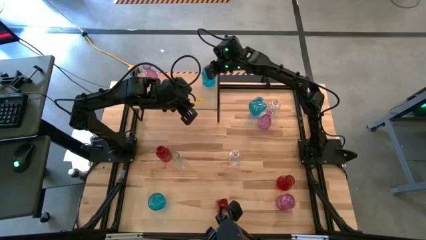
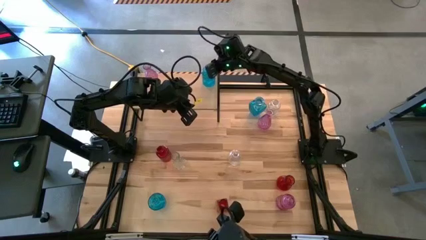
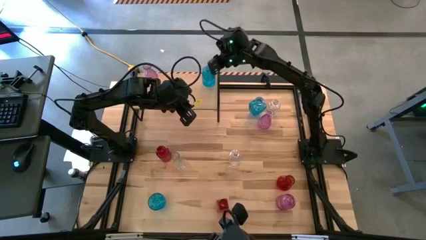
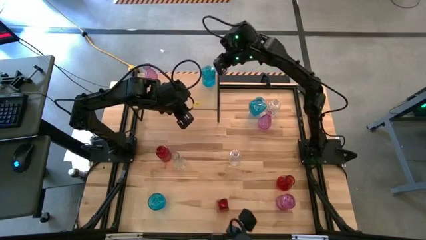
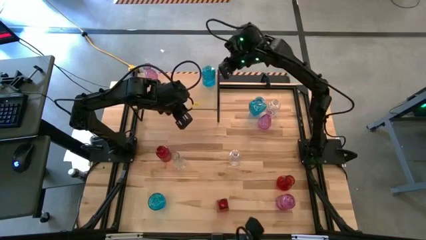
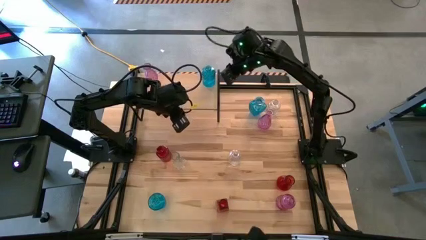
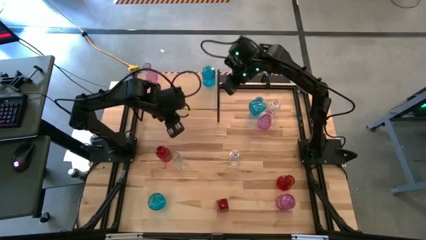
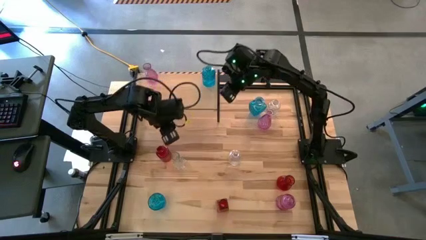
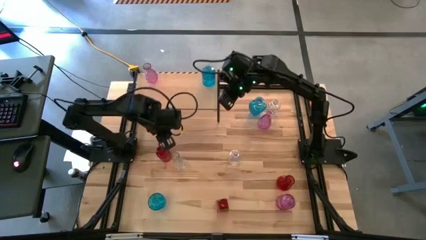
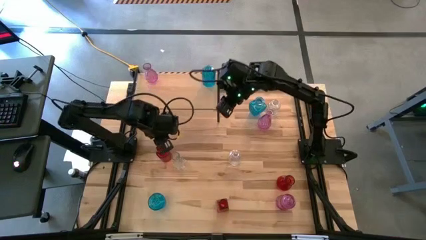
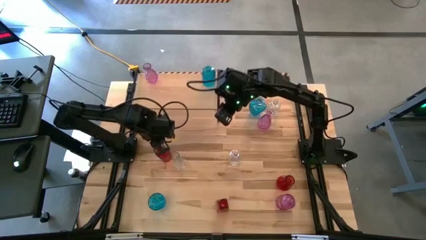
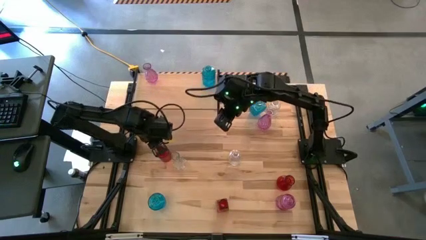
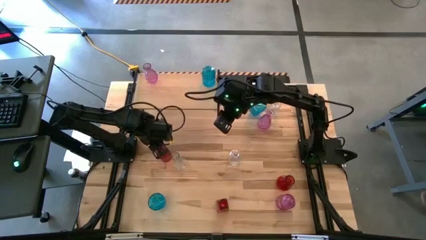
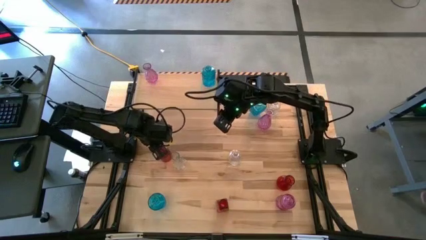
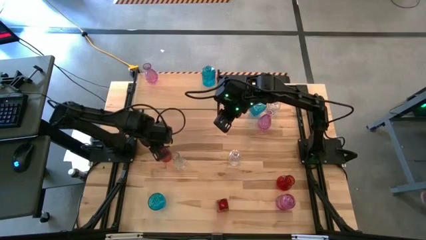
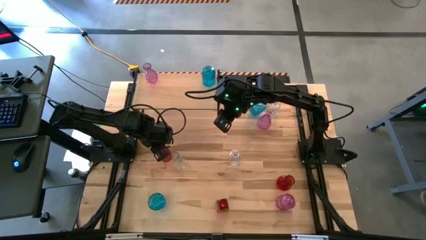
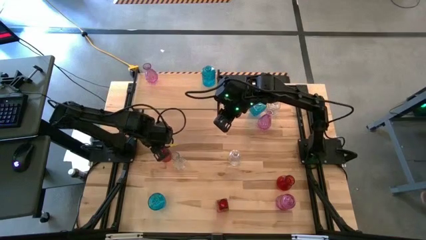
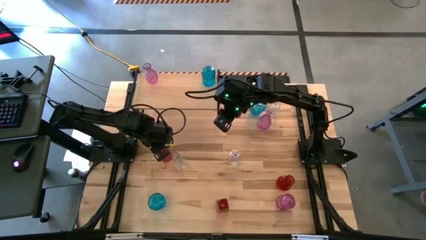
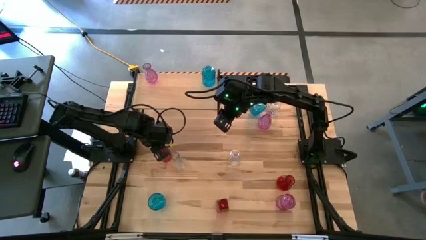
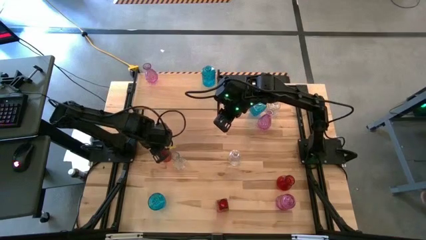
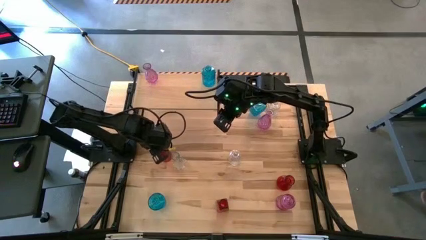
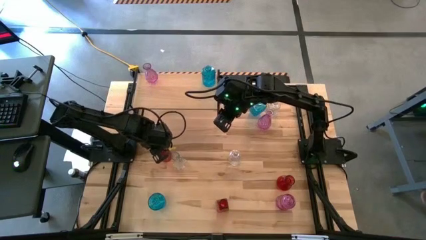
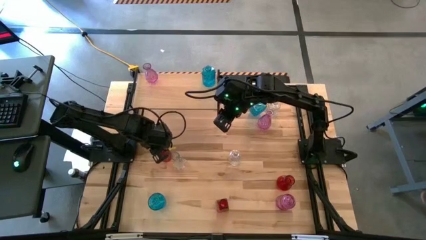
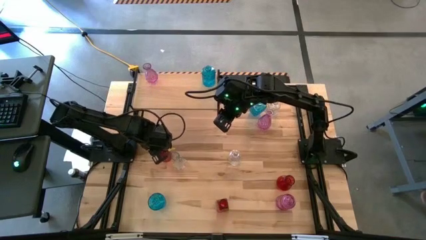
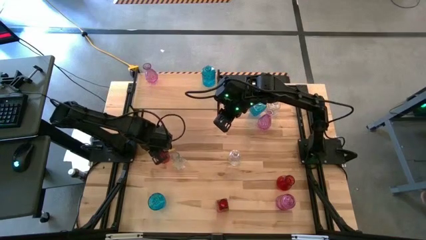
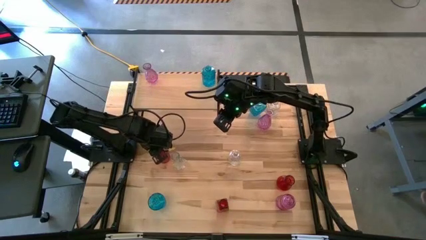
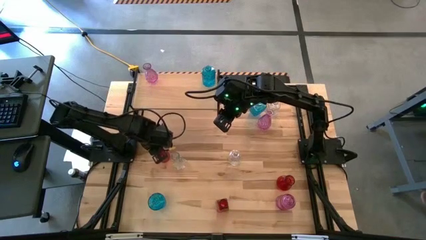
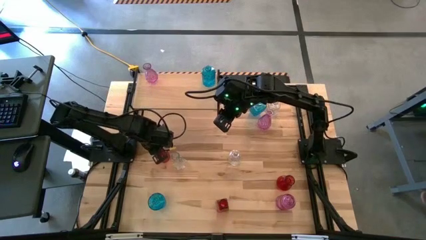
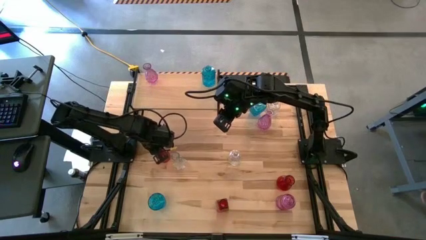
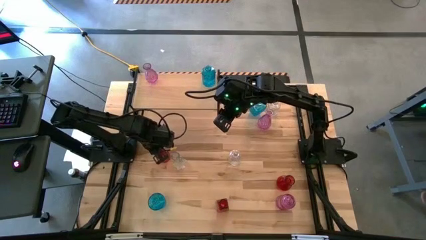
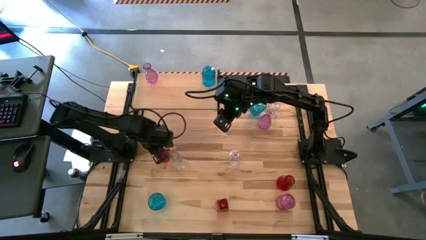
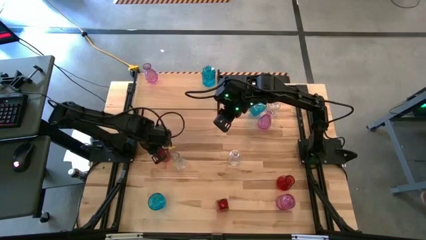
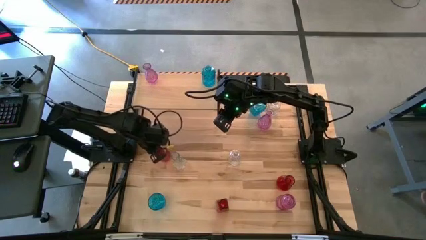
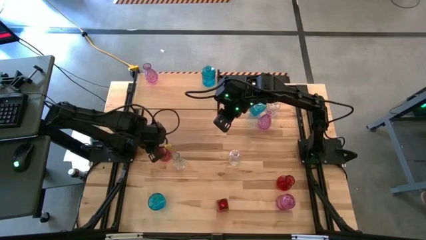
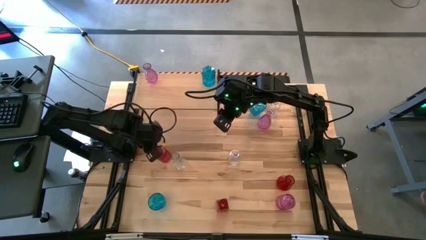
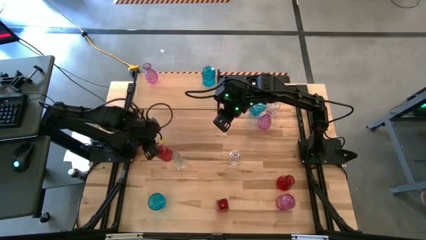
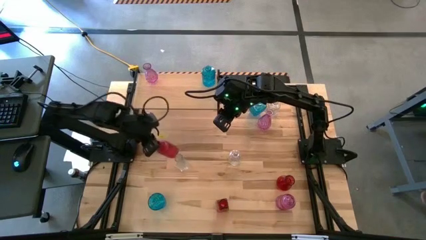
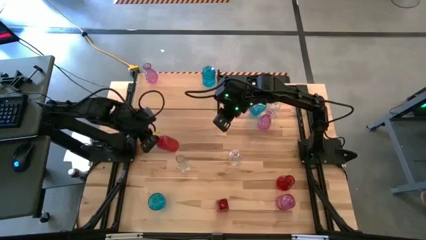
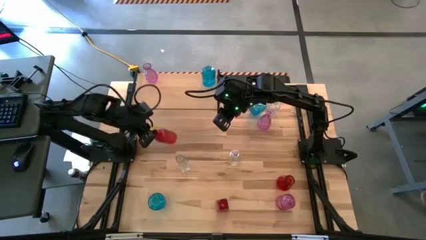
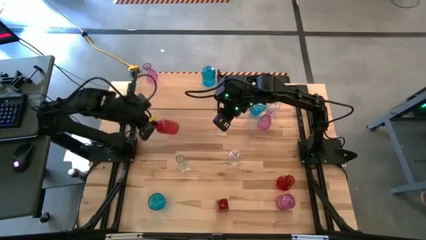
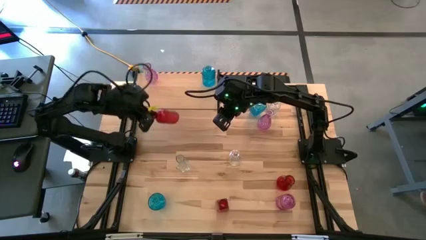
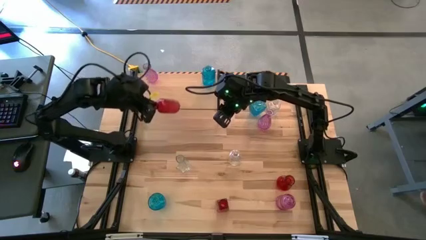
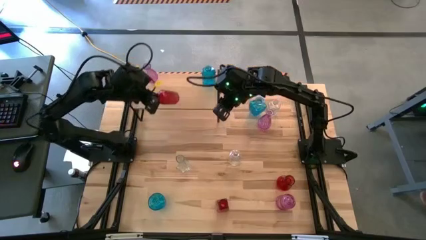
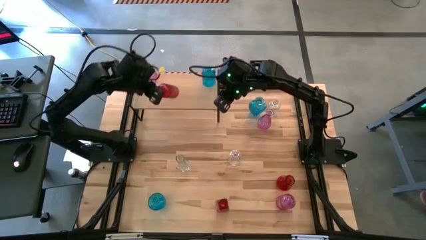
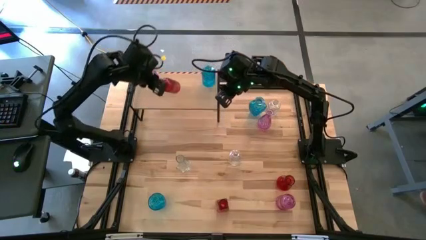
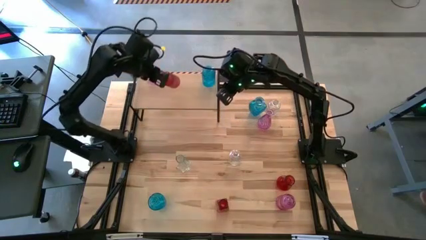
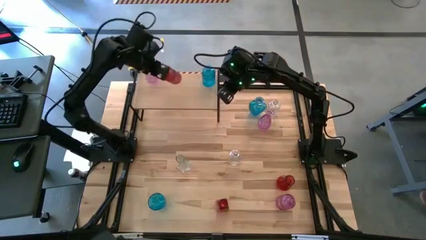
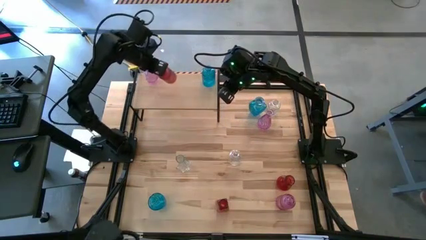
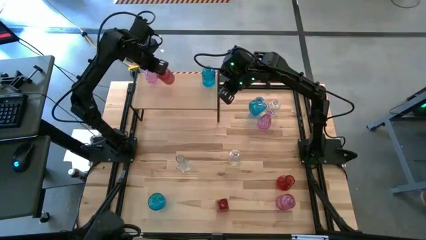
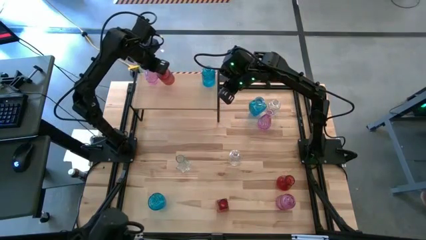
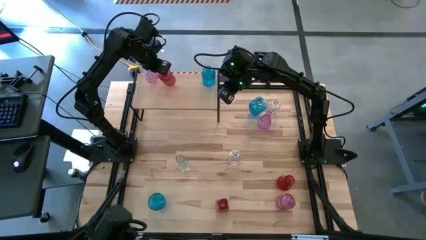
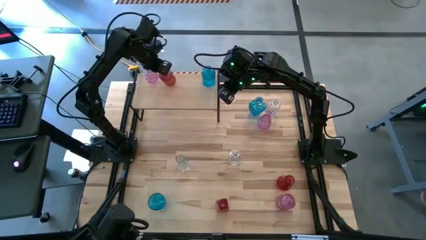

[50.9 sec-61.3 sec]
Task: sort vases onto shelf
Put the top left red vase on the shelf

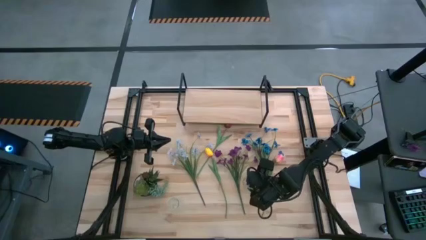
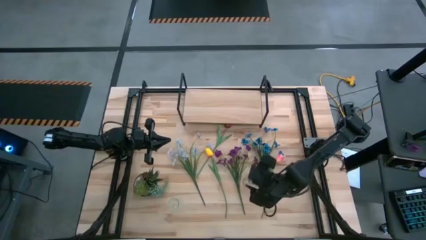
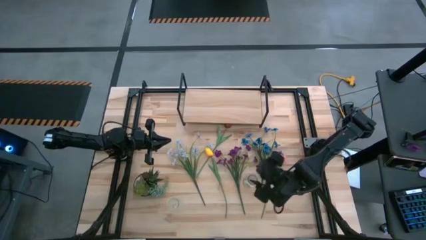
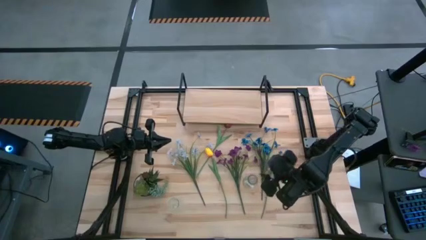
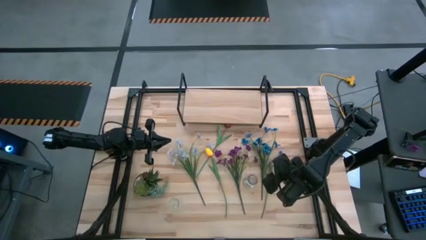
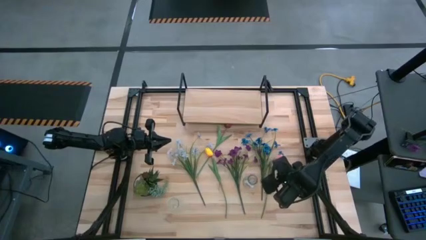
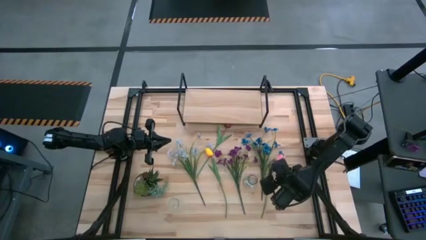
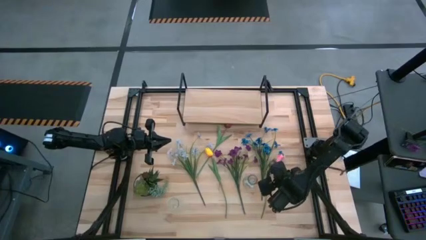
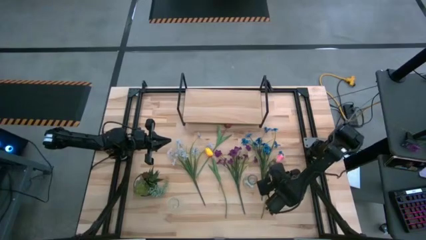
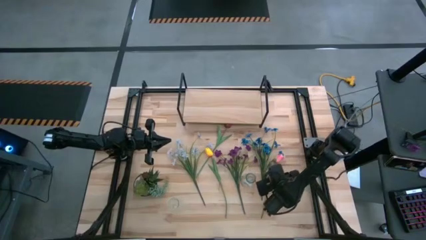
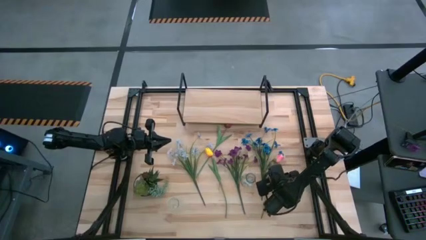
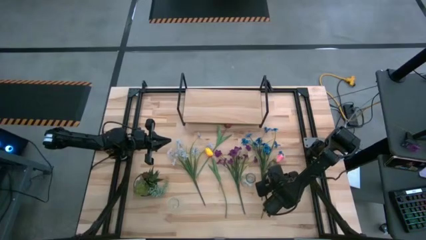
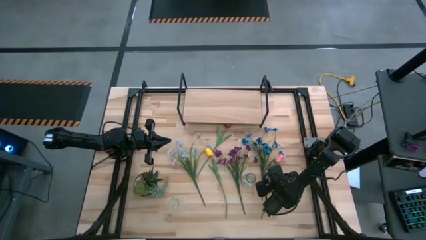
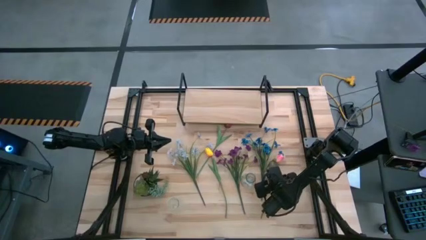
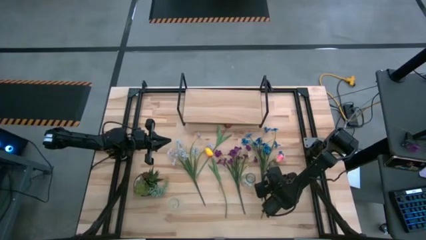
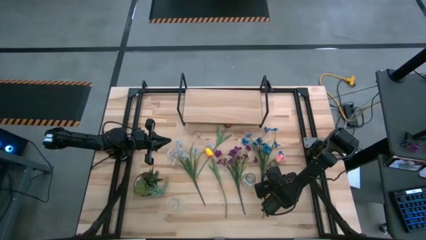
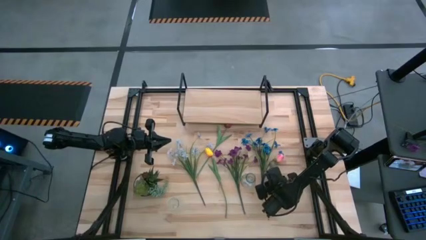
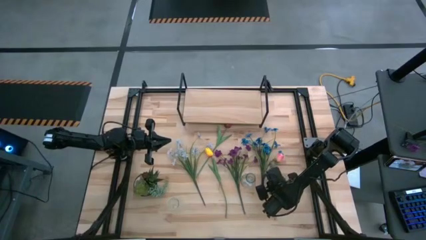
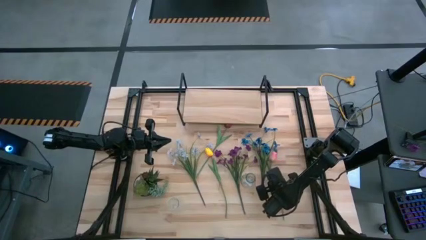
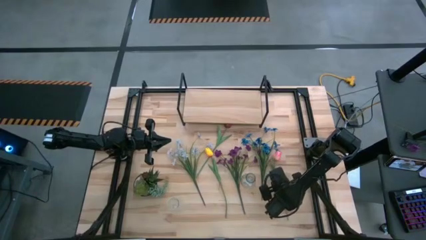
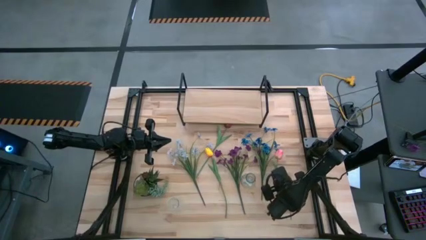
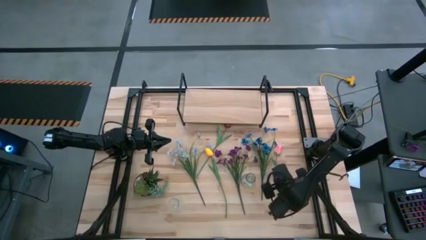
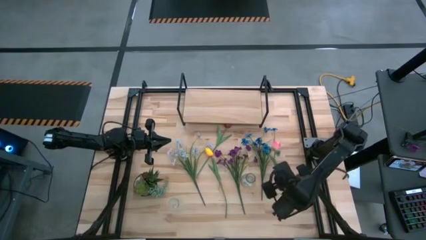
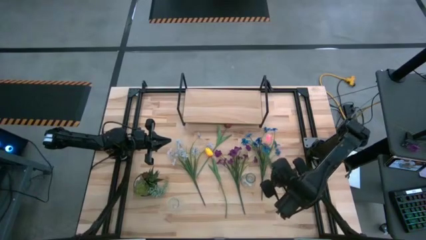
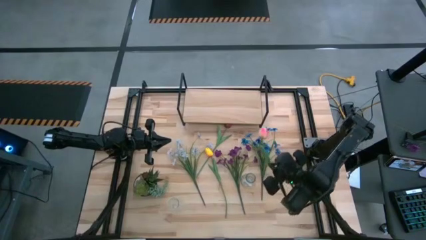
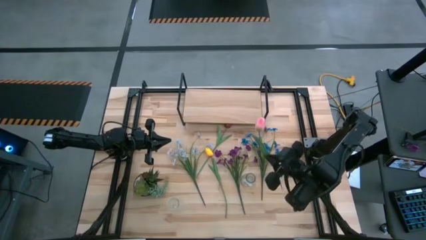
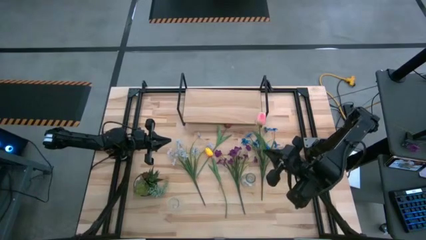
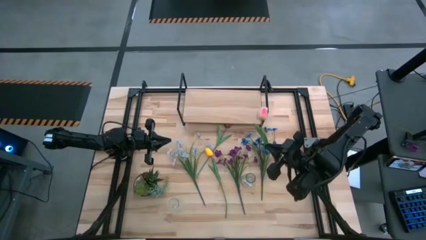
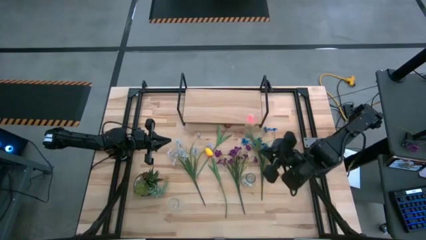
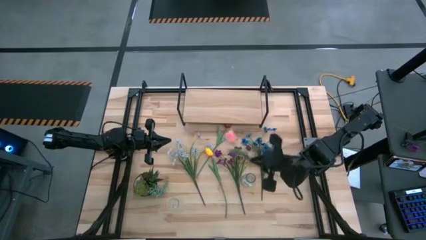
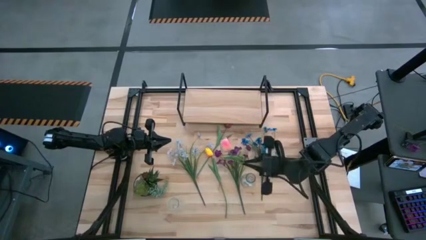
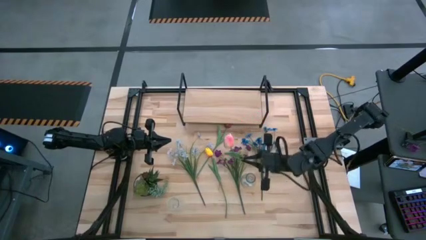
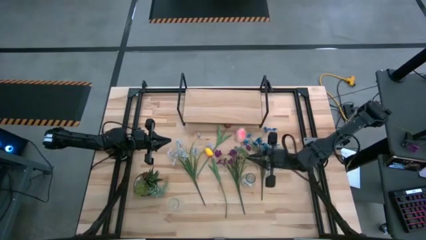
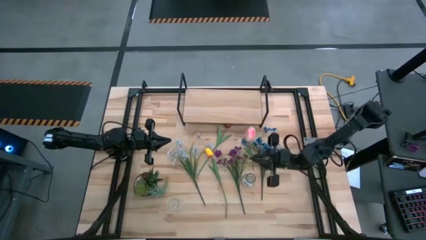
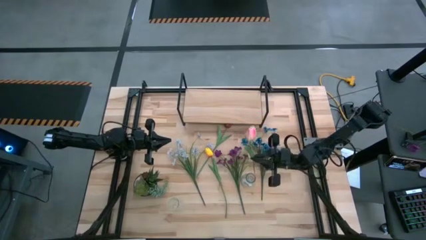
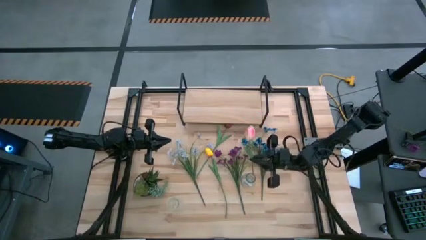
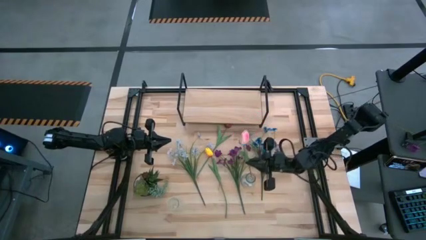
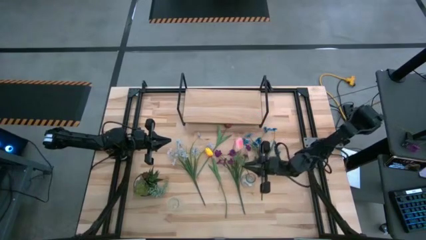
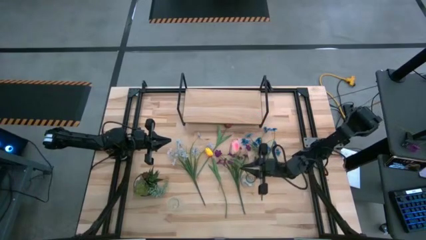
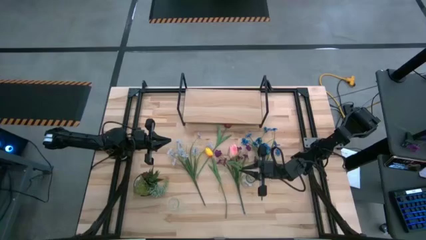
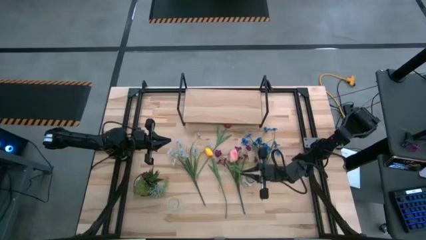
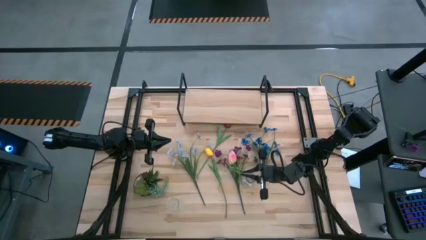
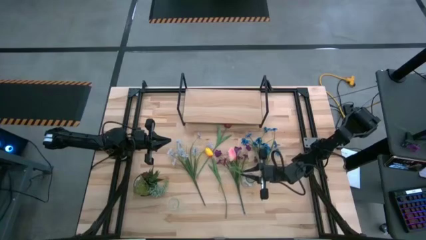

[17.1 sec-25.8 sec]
Task: Pick and place flowers into a vace then onto a shelf
Put the pink flower into the right transparent vase
